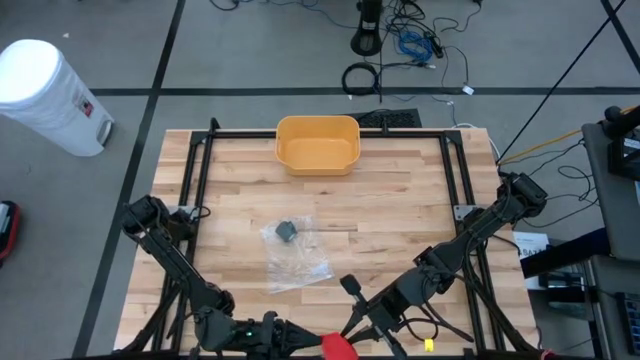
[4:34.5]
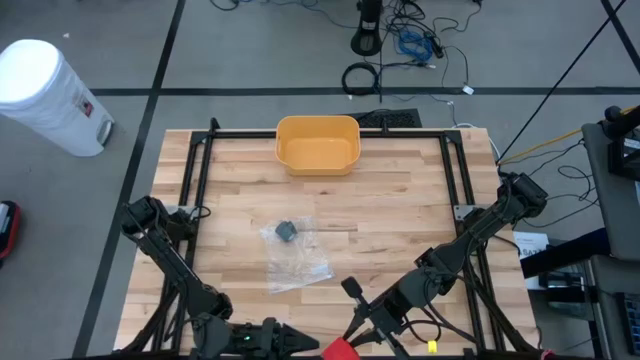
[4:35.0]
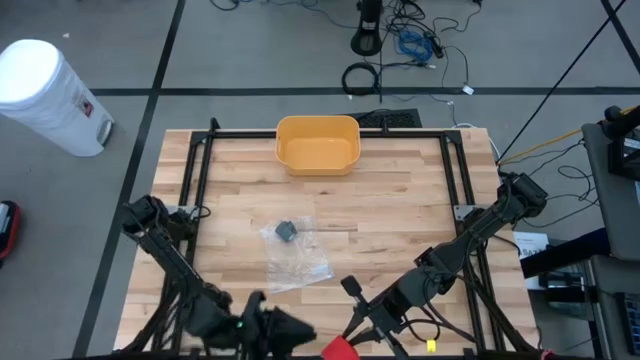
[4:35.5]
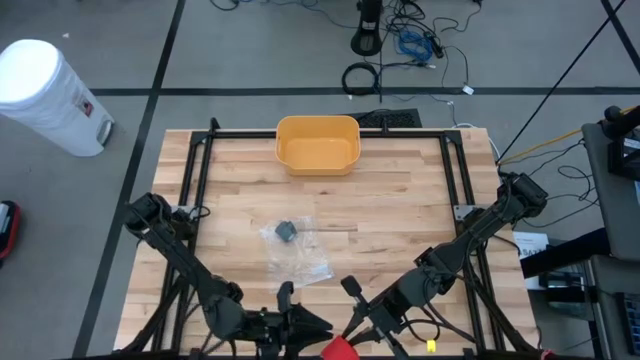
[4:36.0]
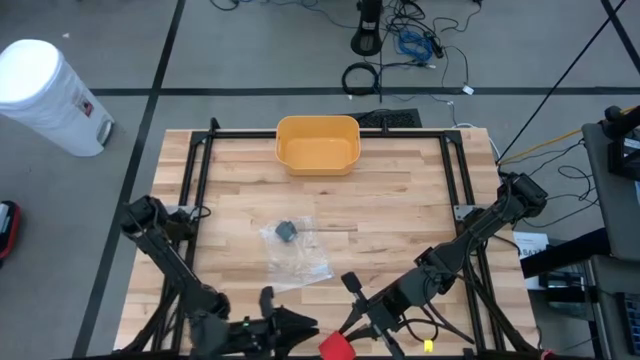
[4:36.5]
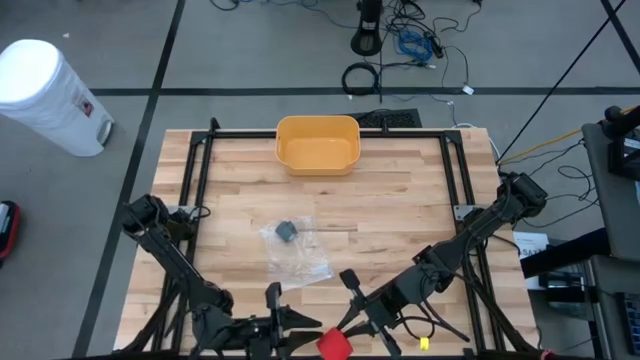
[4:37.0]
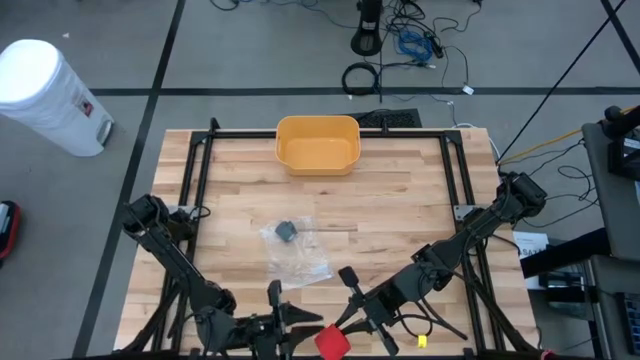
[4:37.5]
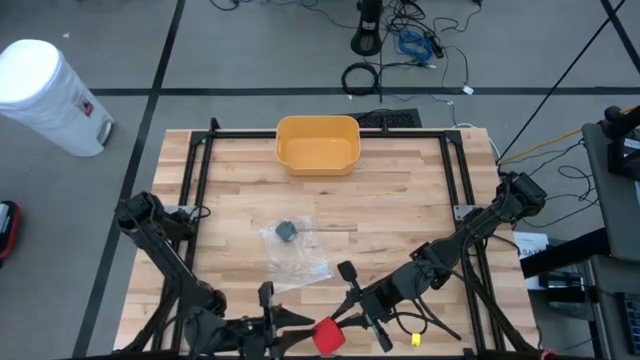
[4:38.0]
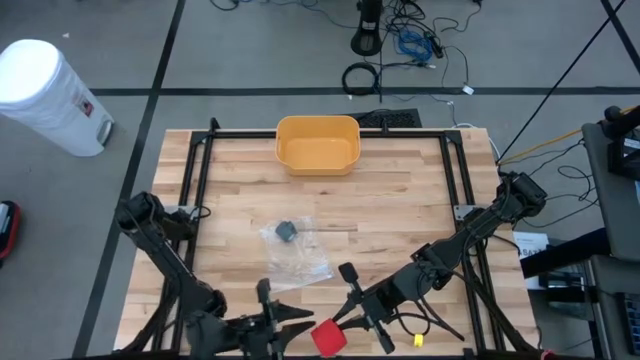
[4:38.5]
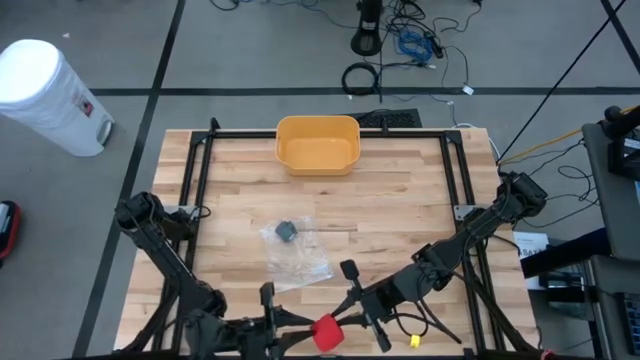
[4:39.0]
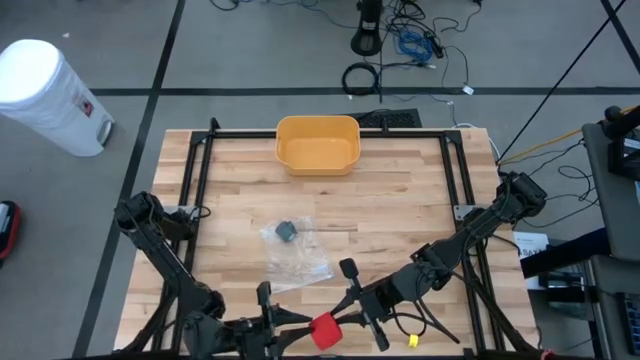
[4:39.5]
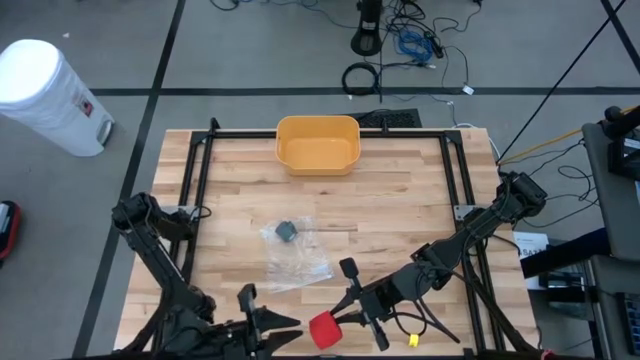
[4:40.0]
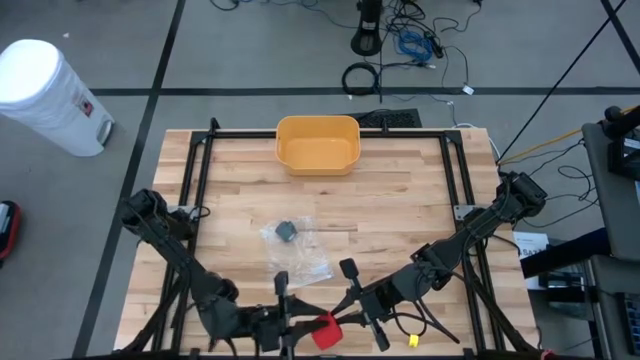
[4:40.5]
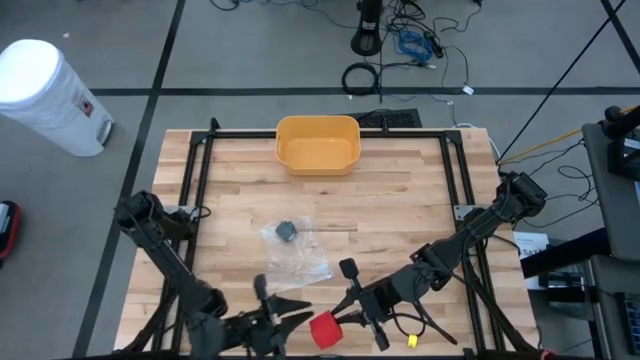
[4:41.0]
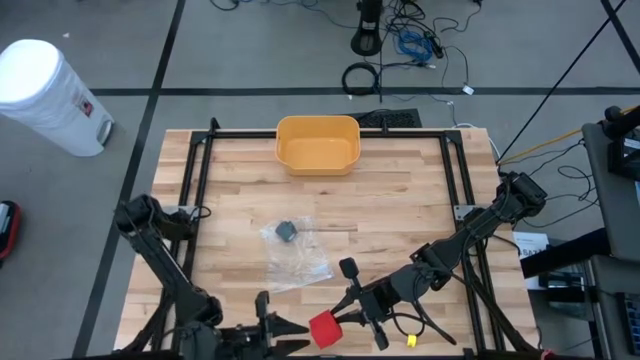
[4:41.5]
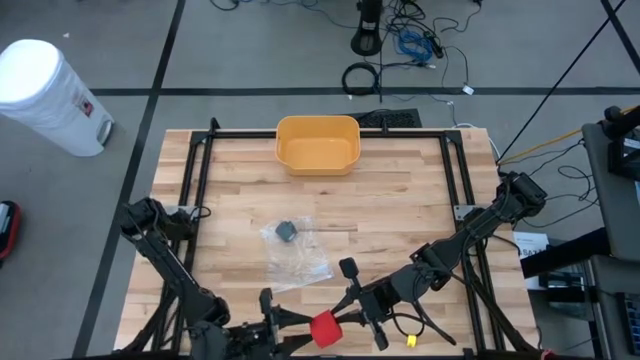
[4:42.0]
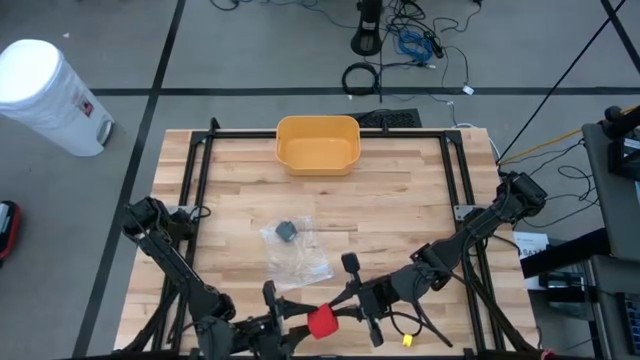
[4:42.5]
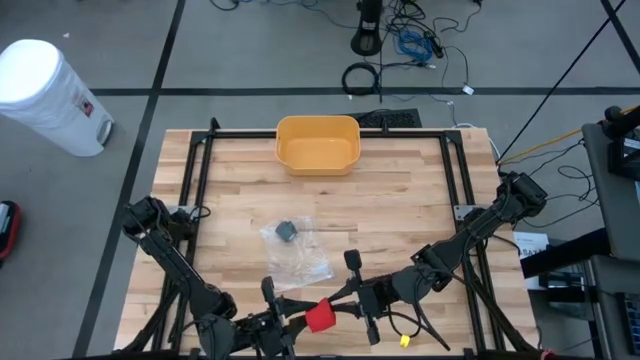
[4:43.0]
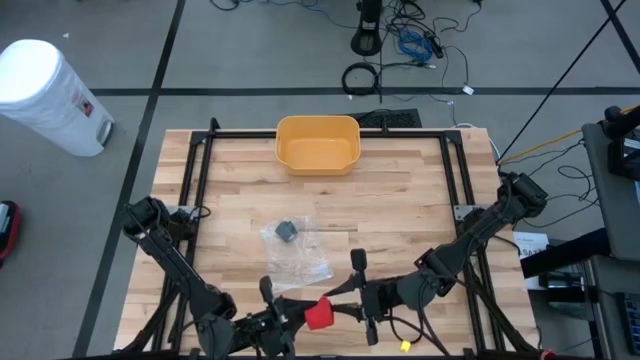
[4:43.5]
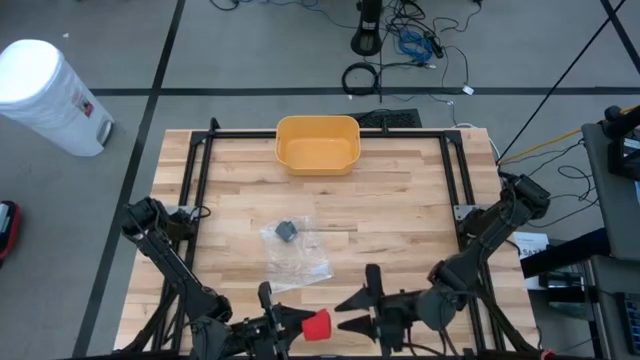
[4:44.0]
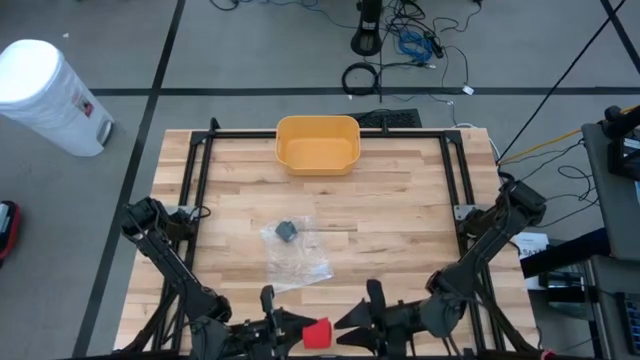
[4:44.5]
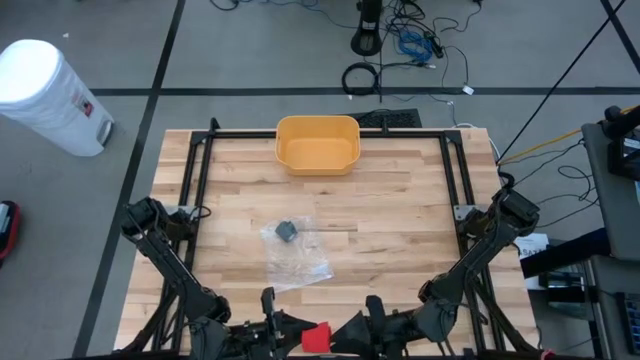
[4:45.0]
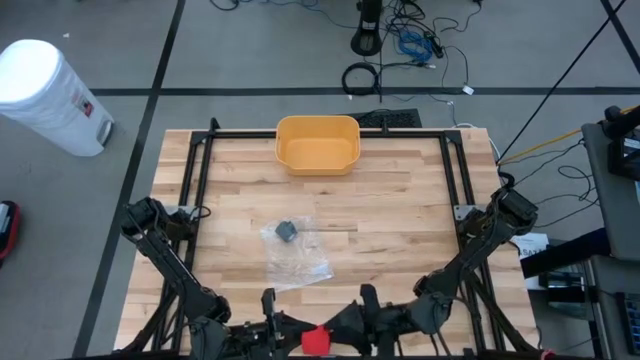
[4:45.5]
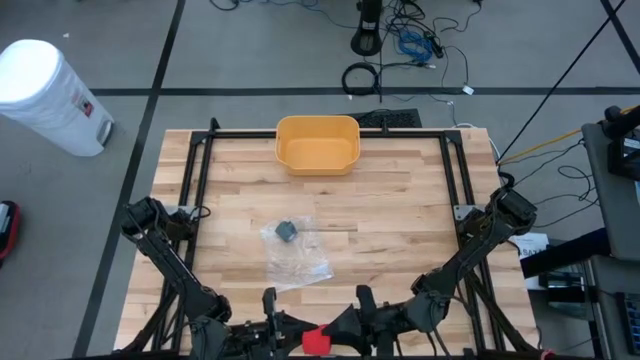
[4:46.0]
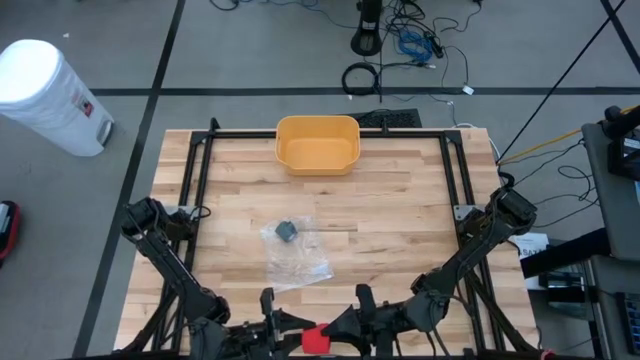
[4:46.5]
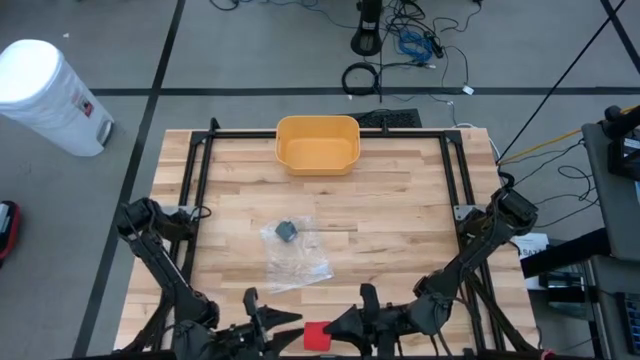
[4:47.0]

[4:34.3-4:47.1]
Task: Roll bandage
Roll the red bandage

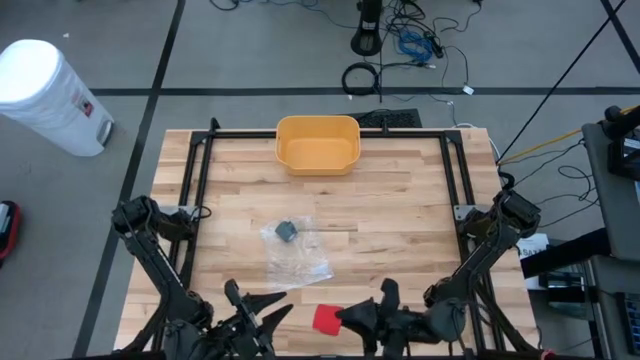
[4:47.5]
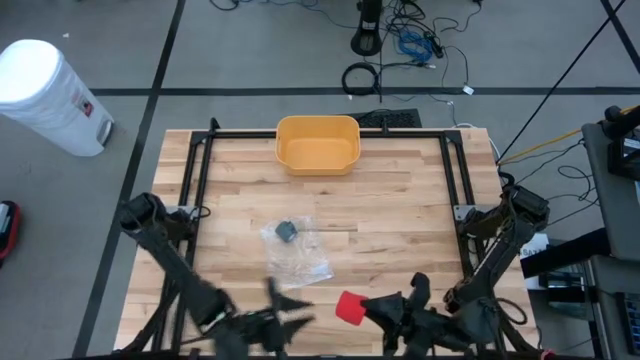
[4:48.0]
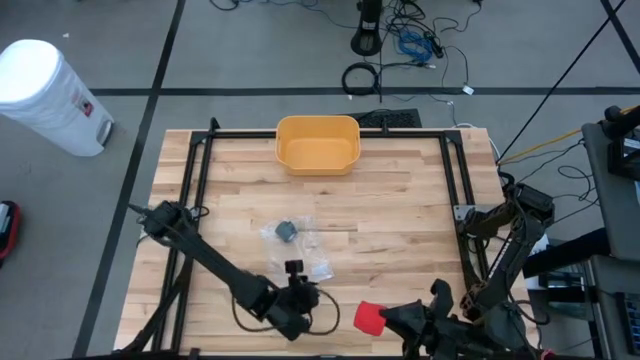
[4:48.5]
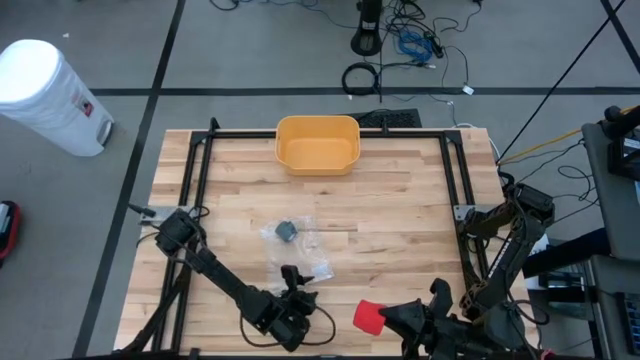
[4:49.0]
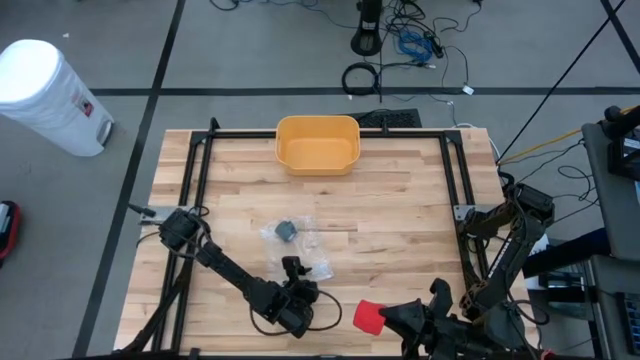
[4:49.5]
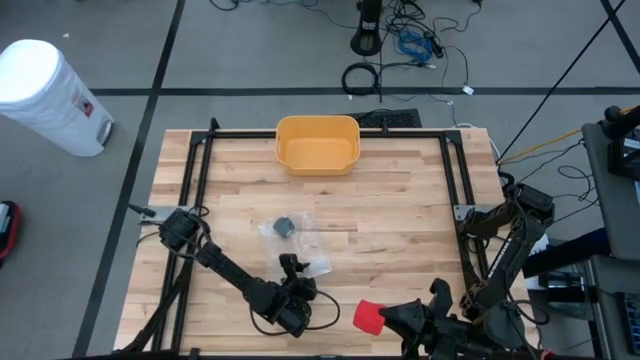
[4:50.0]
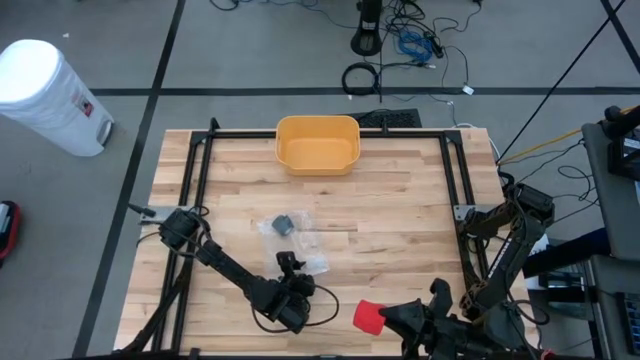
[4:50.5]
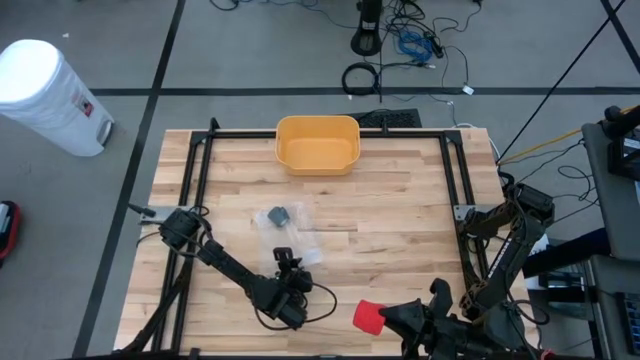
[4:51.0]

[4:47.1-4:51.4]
Put the red bandage into the transparent zip bag

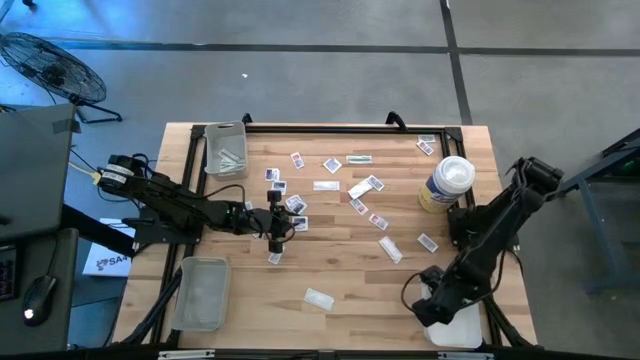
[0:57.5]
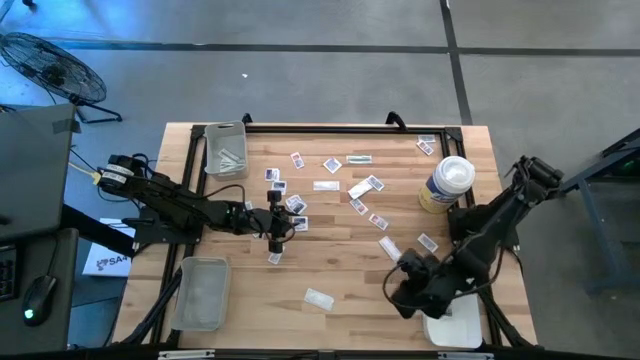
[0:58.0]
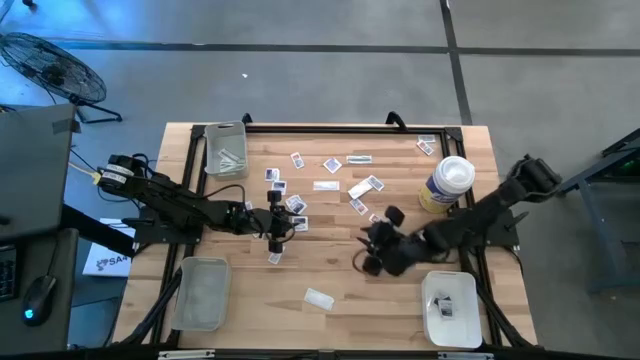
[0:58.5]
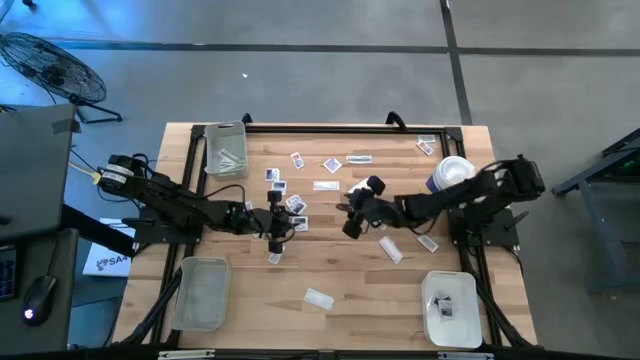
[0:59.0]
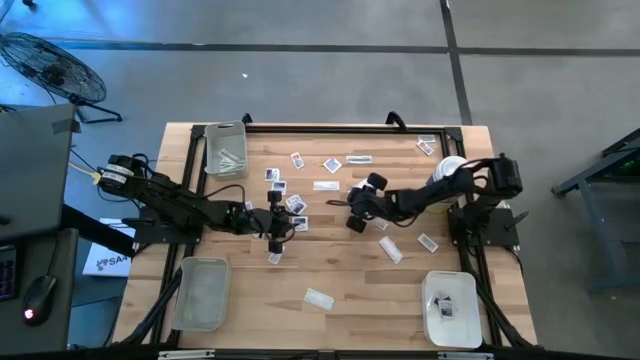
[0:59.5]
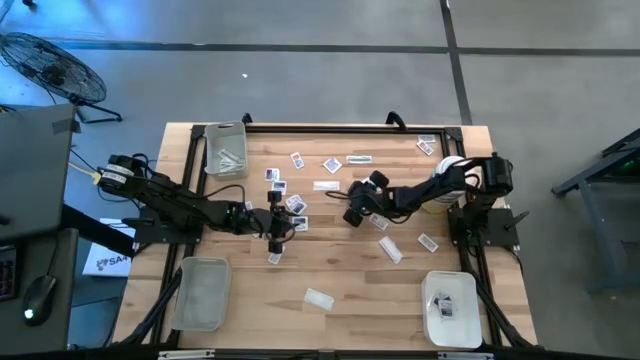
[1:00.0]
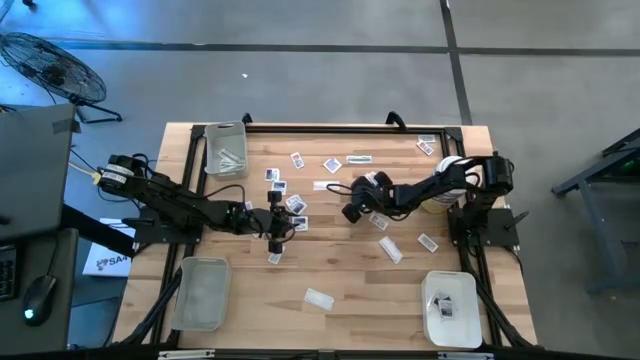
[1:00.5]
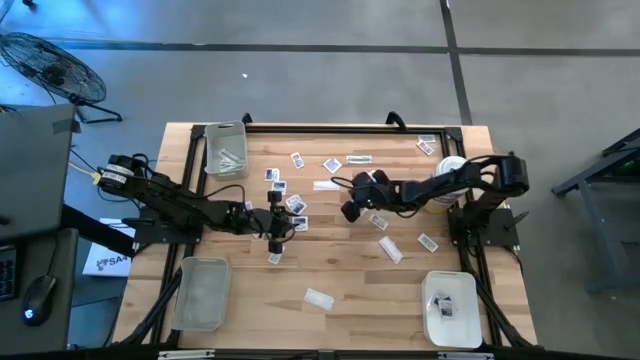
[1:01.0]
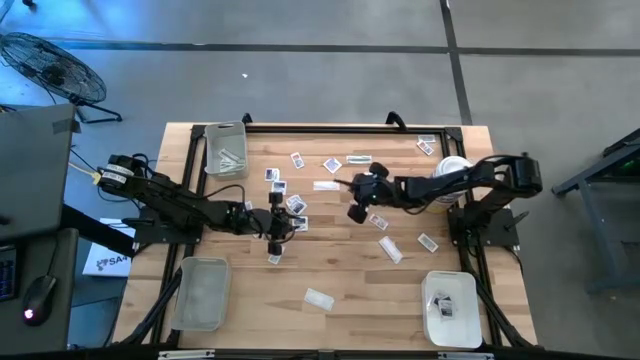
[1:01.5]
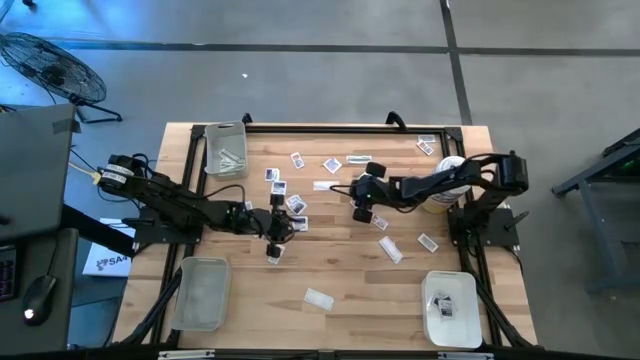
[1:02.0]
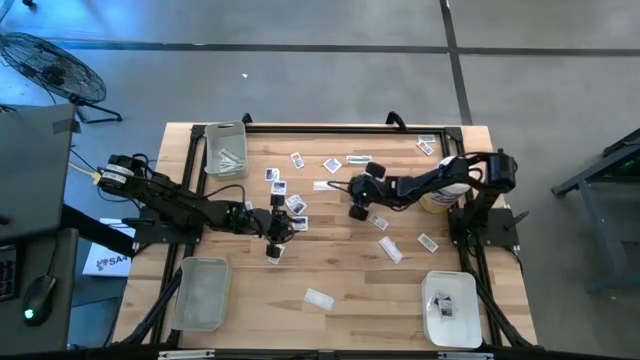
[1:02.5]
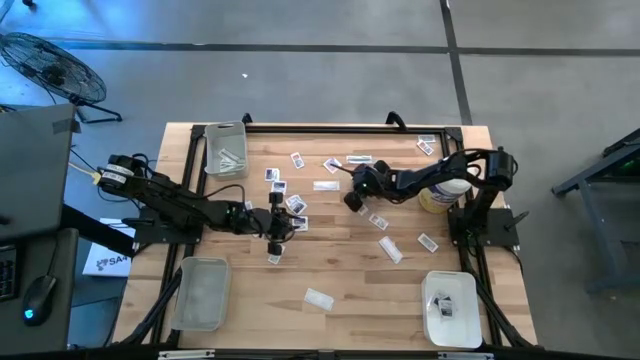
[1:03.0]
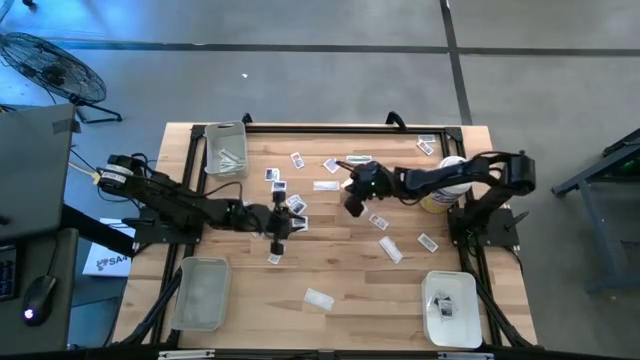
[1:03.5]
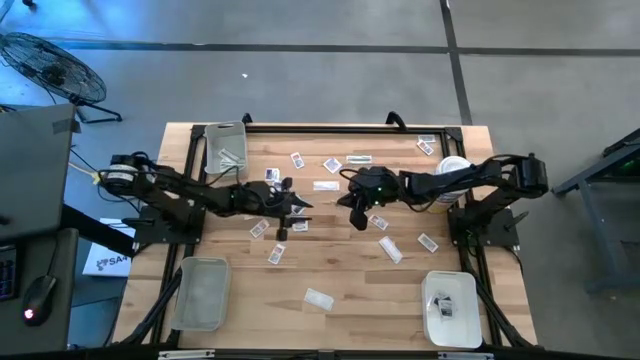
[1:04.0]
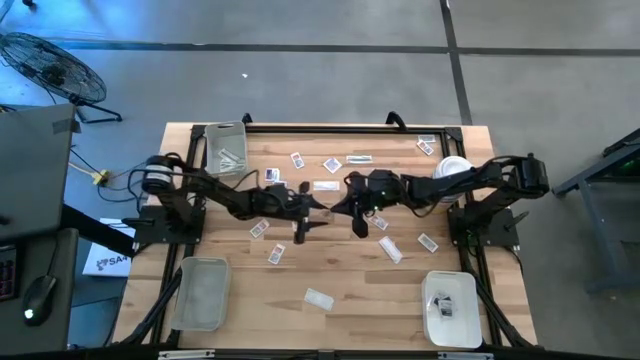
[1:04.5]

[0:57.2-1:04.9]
Task: Pick & Place First Aid Supplies
Put the green bandage pack into the top gray bin
